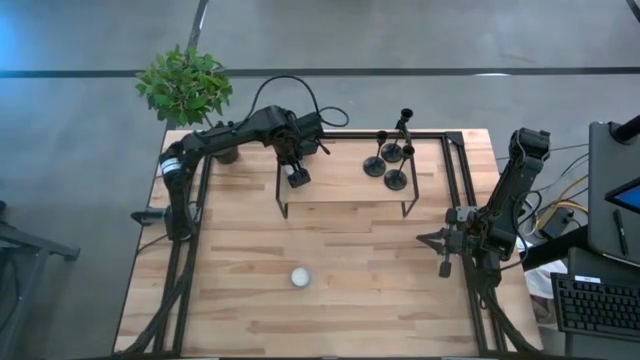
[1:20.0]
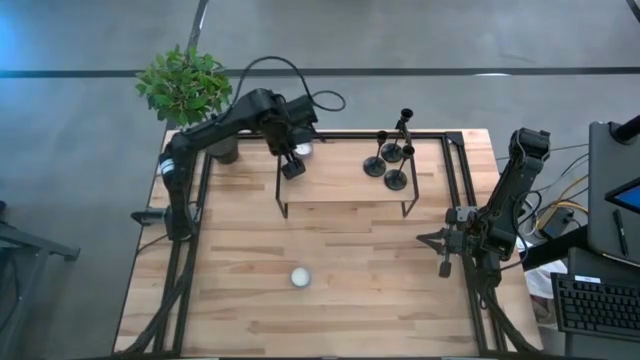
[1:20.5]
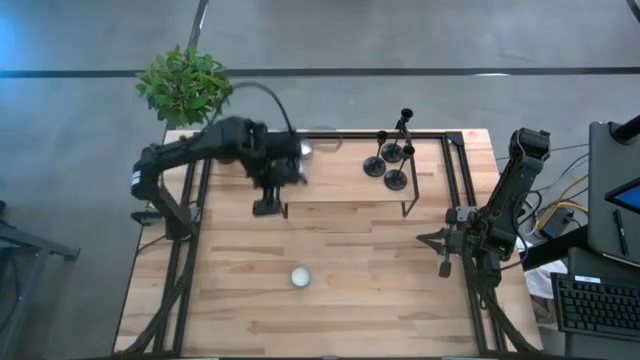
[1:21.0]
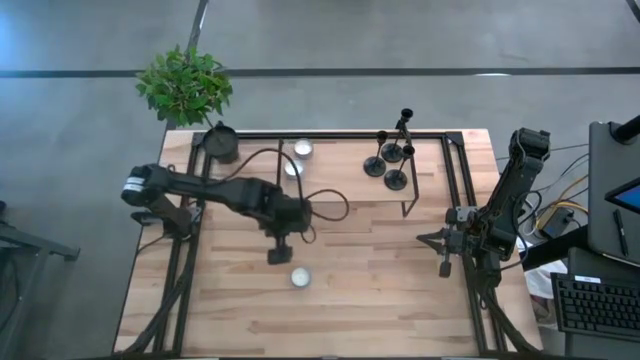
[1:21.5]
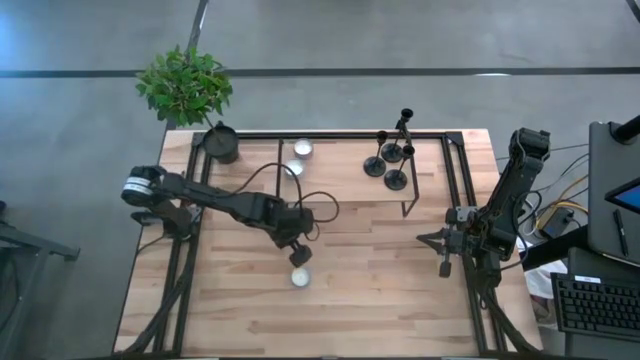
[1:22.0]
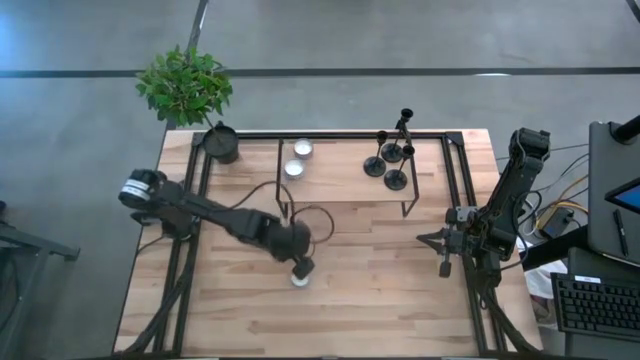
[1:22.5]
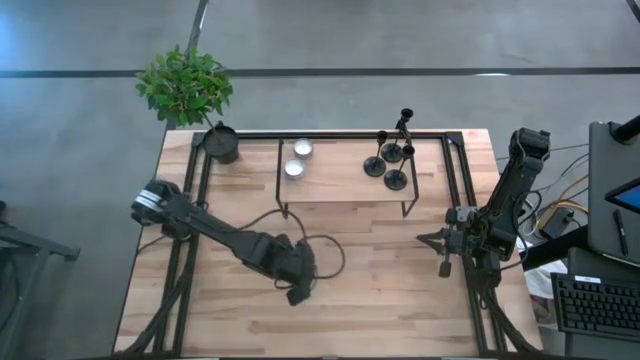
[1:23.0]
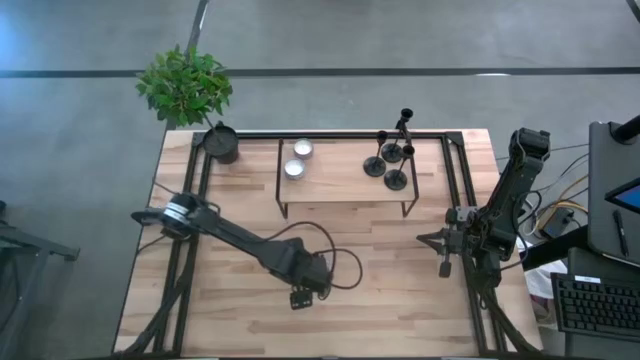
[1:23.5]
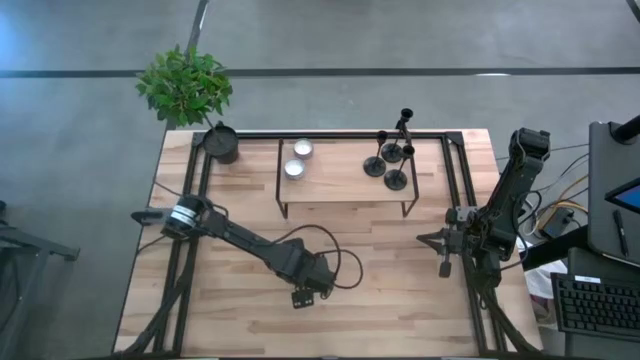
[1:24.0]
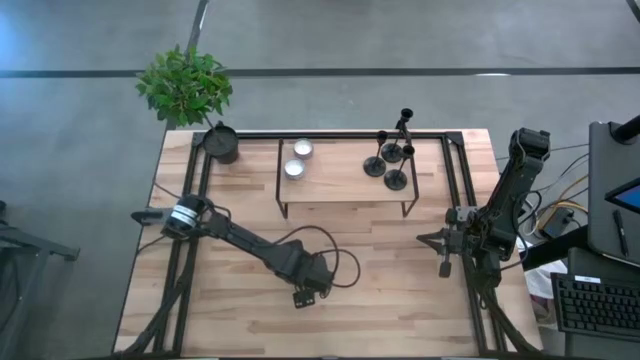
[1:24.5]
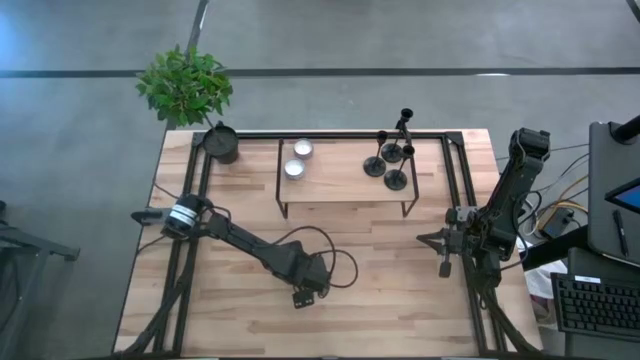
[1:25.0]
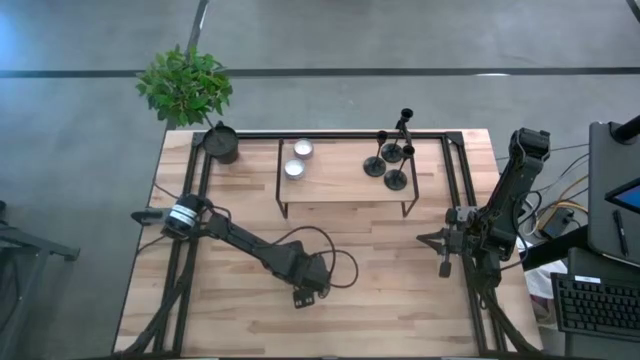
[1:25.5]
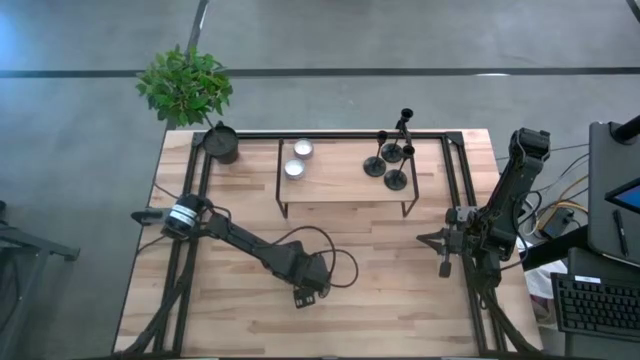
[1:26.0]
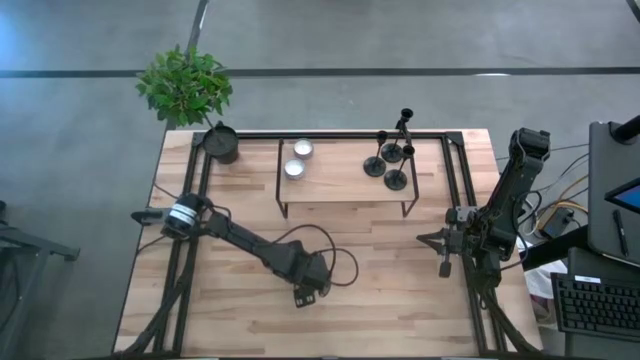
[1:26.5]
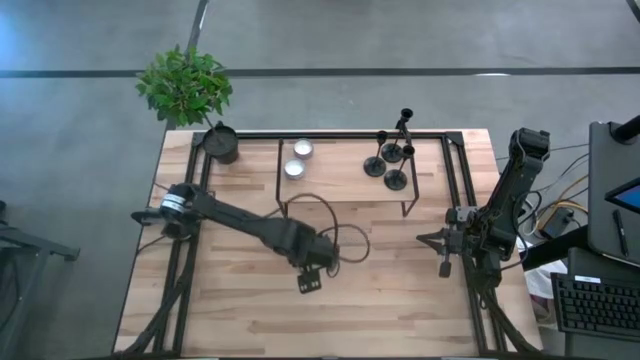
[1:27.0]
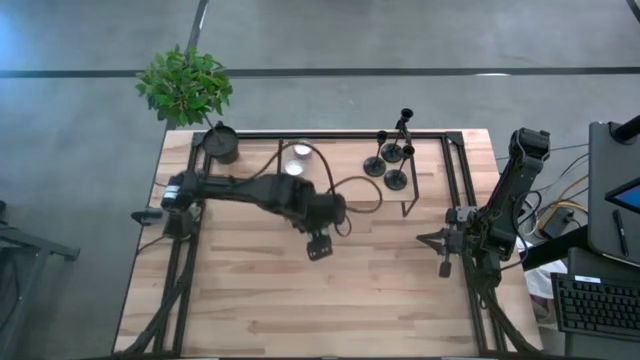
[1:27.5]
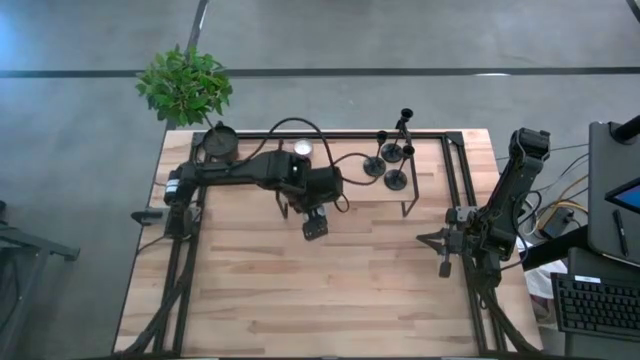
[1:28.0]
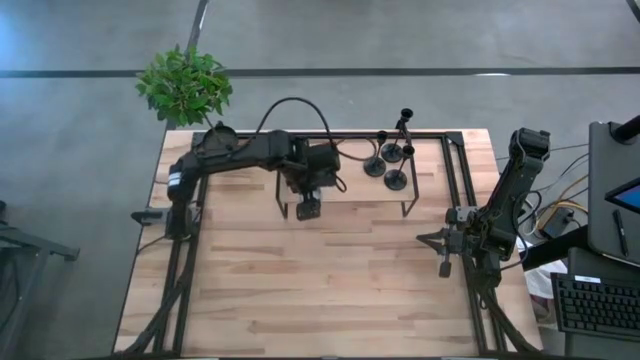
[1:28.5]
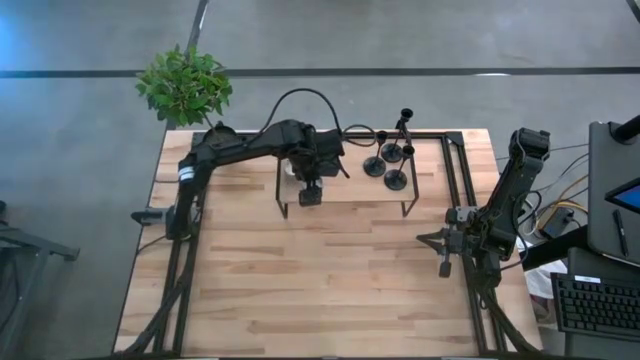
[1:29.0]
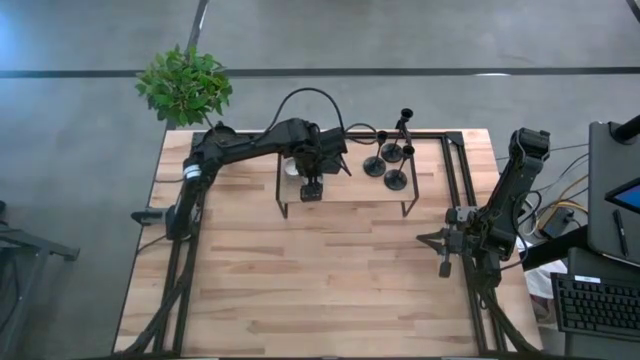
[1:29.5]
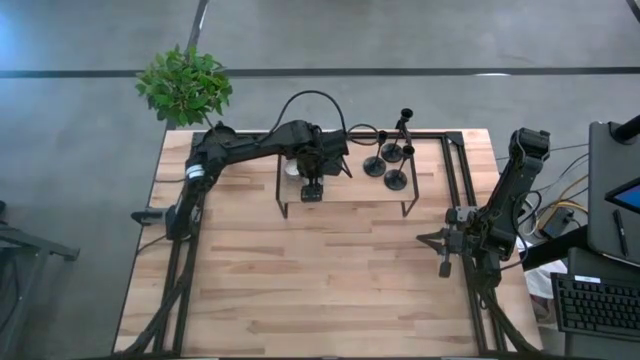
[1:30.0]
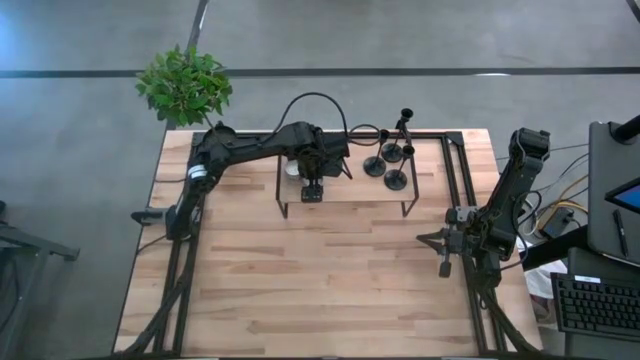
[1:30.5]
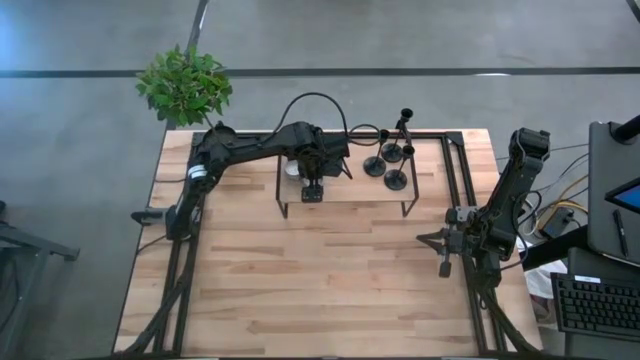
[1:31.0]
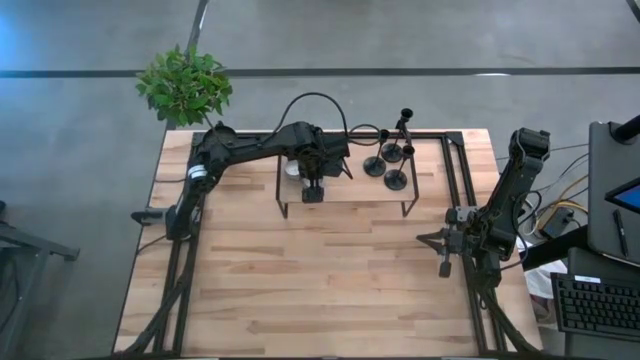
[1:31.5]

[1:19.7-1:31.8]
Task: Pick & Place candle stick holders
Put the blue scented candle on the shelf

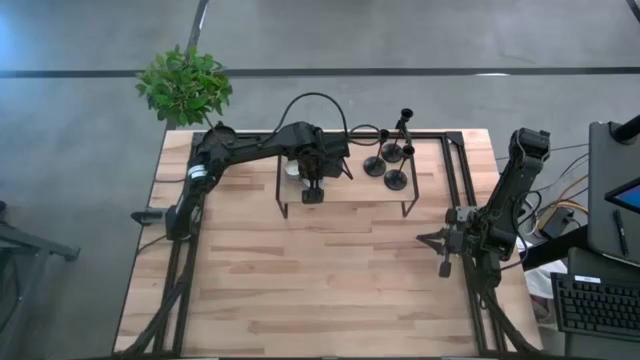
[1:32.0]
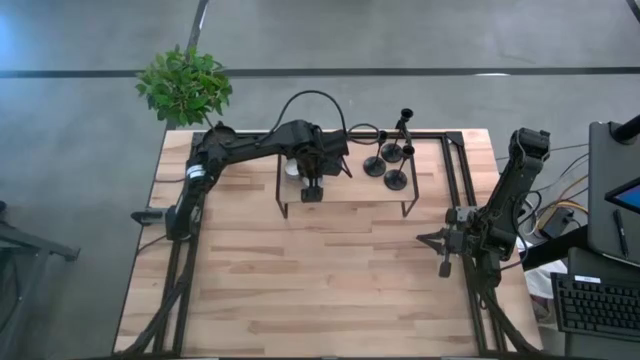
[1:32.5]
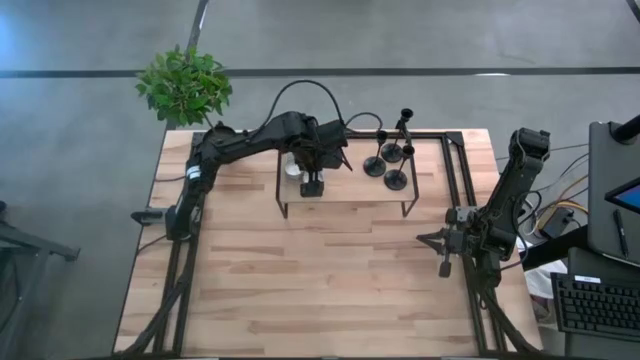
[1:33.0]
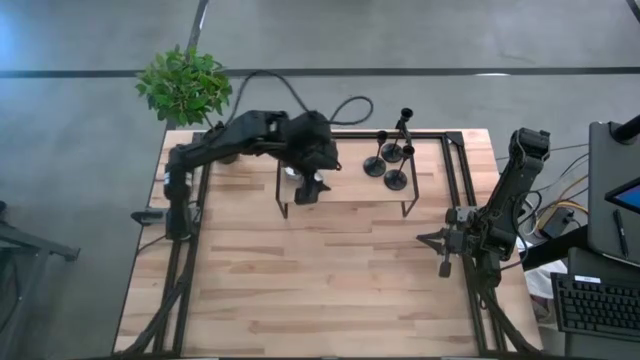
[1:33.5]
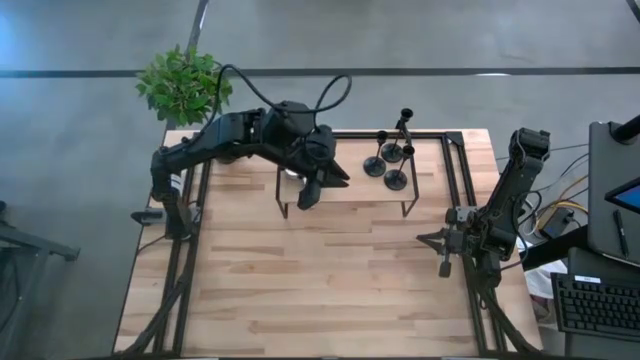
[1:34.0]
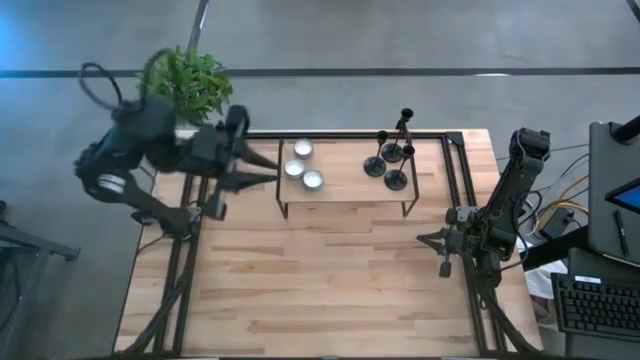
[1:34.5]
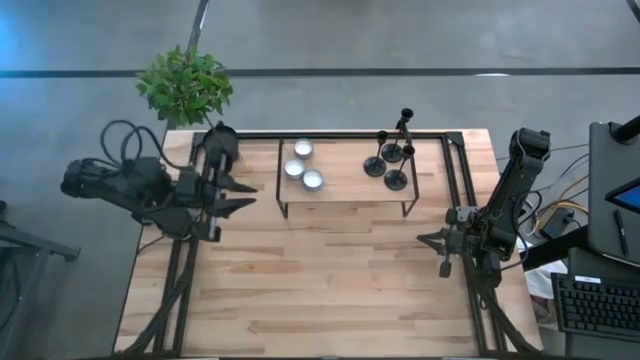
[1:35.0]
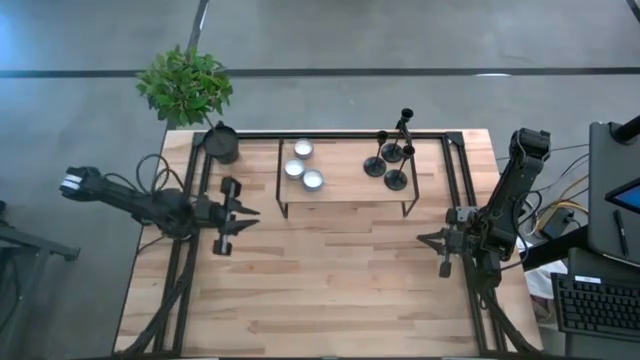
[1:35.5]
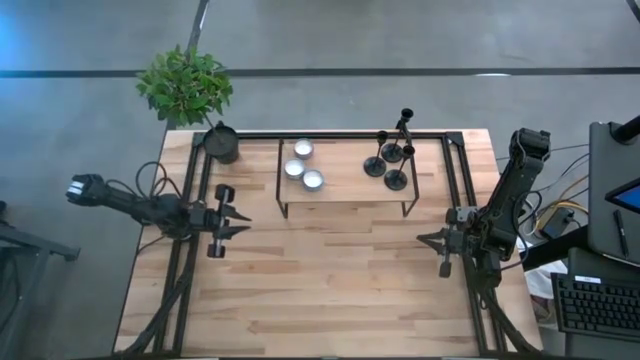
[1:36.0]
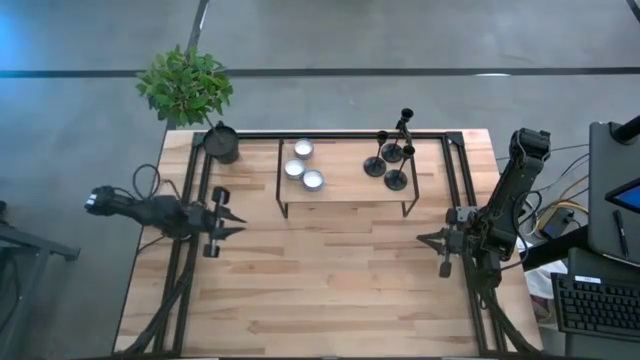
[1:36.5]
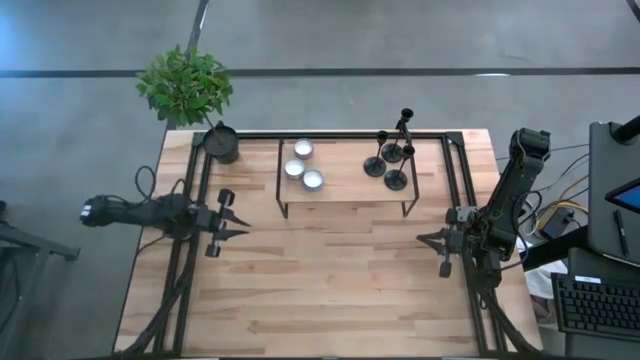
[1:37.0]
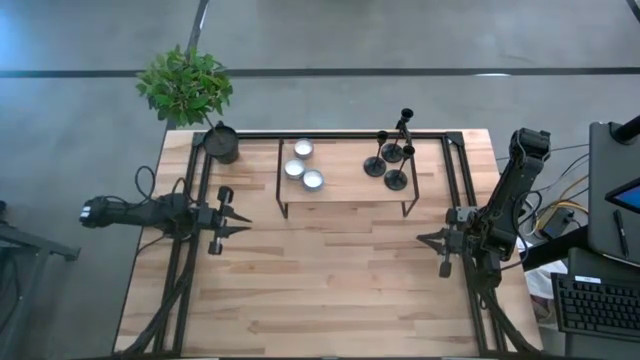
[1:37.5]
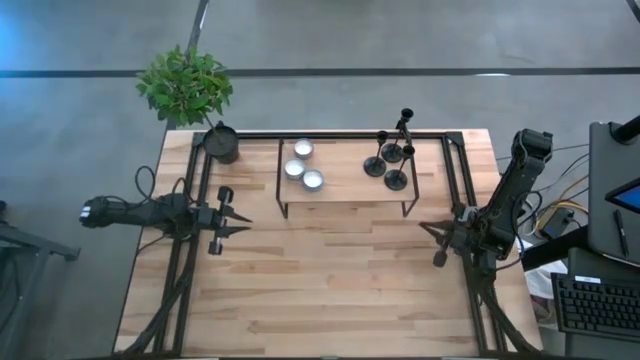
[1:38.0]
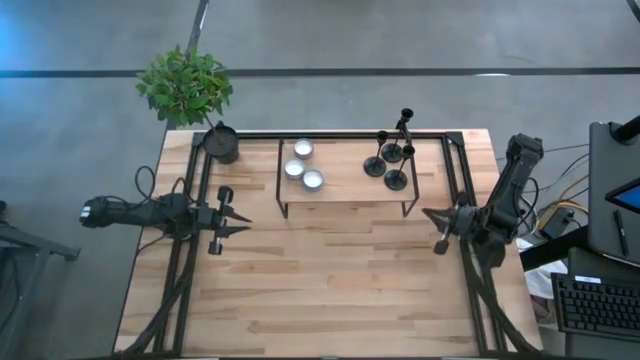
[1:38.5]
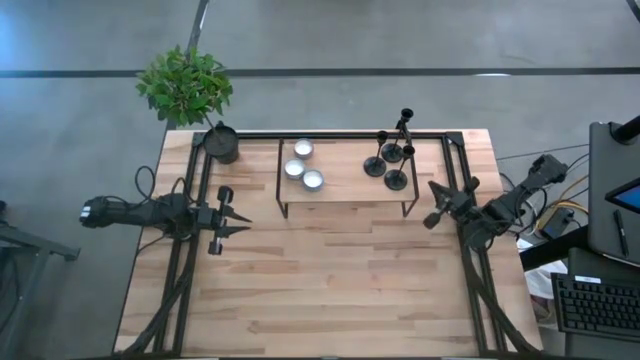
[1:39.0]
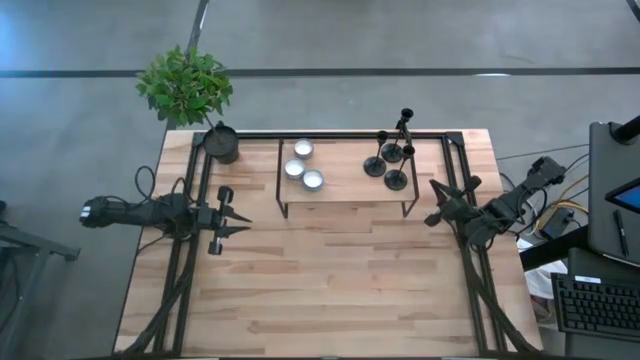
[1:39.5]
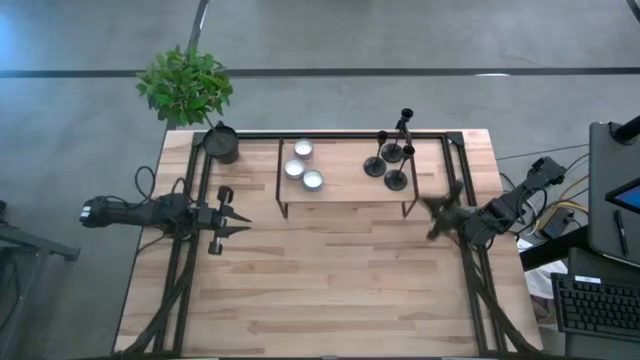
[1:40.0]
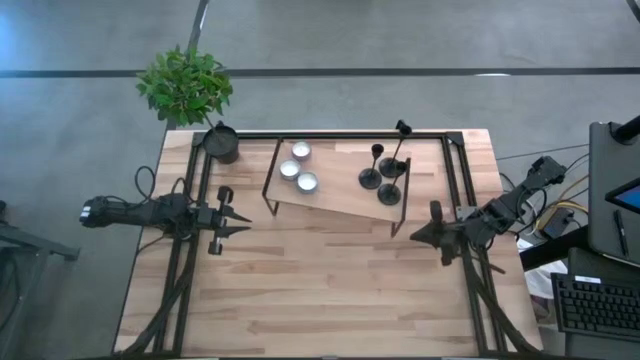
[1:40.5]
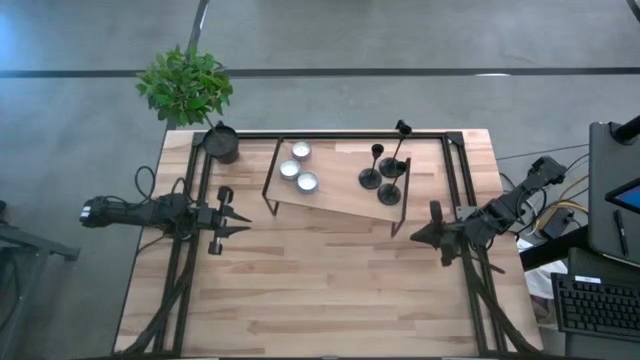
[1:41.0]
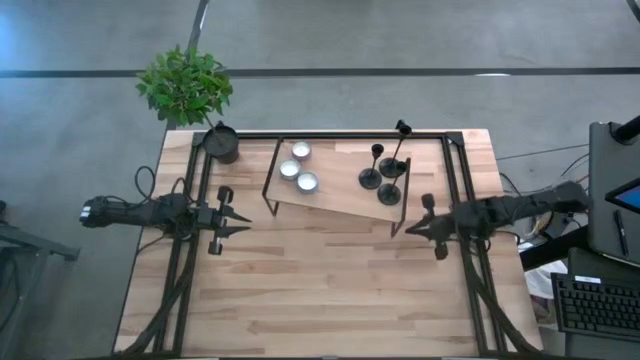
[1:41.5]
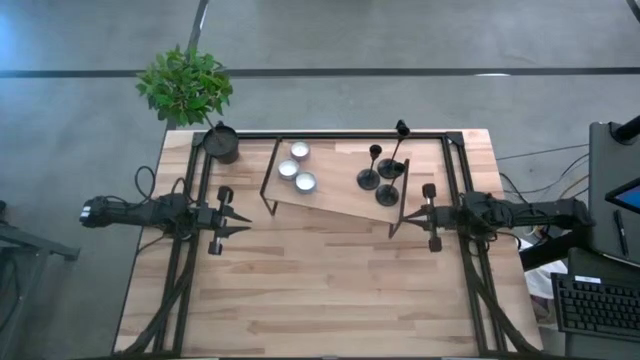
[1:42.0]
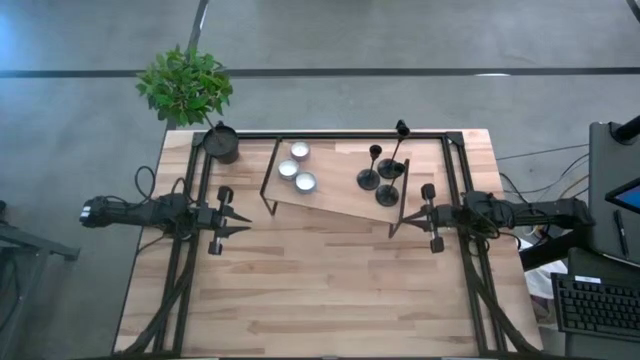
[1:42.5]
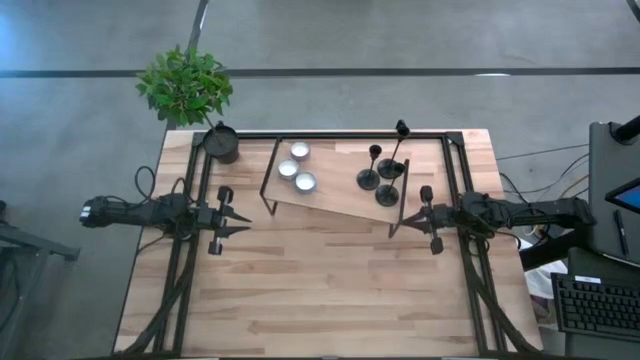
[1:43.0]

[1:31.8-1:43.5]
Return to Home Position
